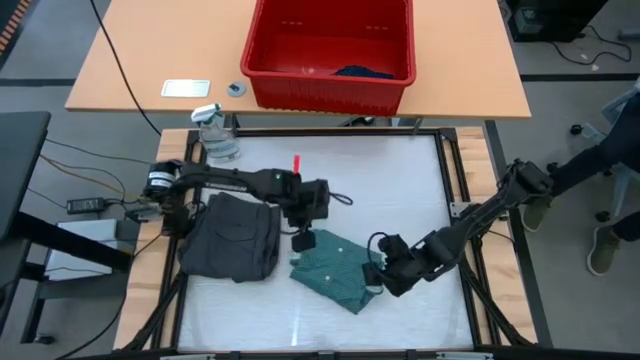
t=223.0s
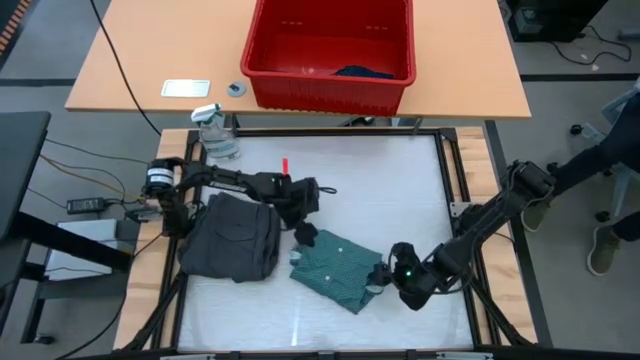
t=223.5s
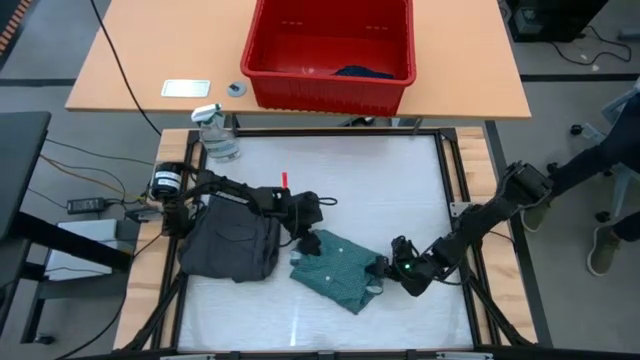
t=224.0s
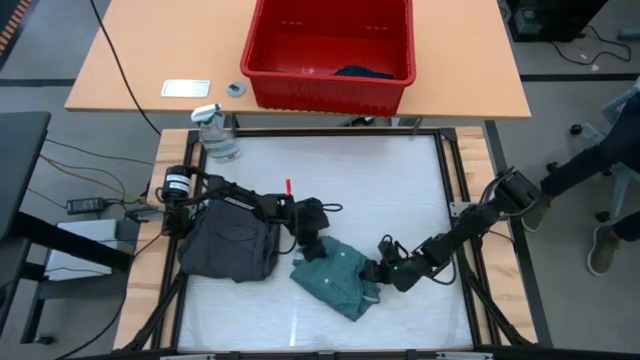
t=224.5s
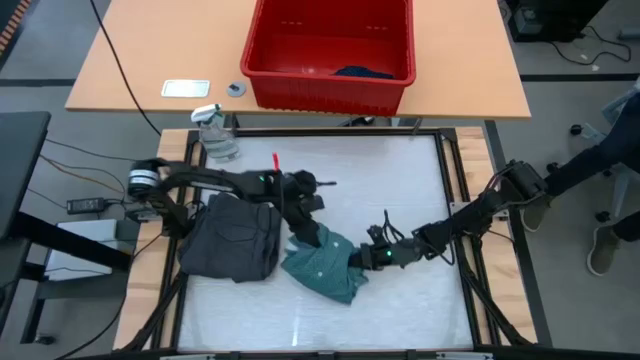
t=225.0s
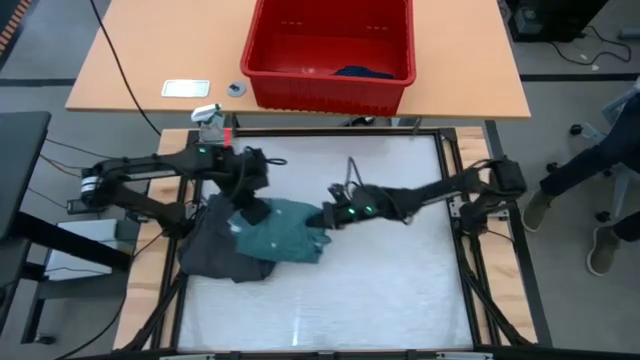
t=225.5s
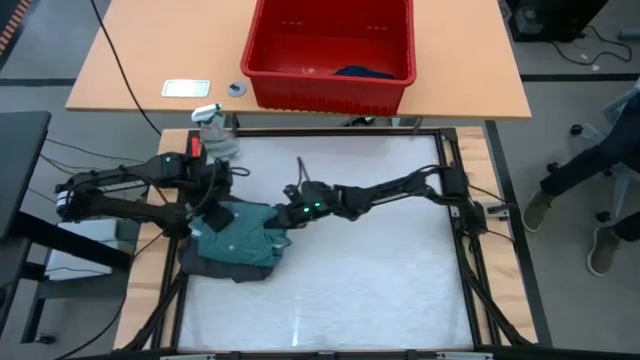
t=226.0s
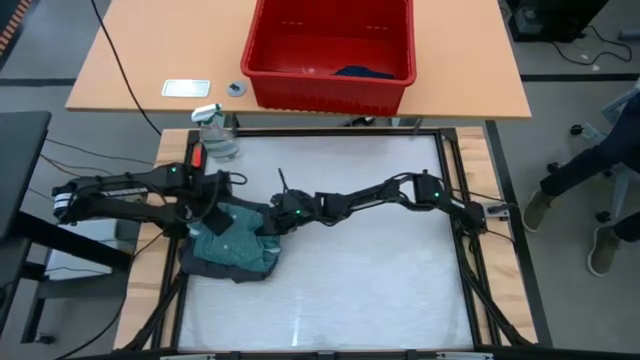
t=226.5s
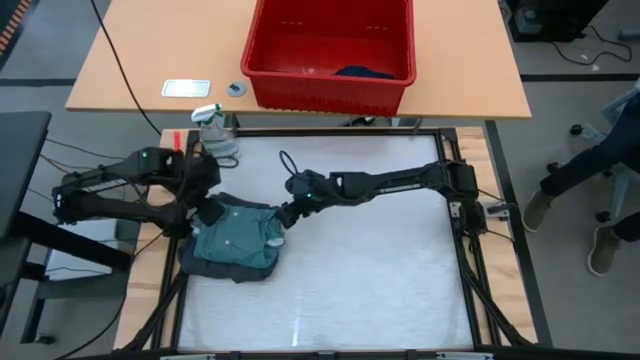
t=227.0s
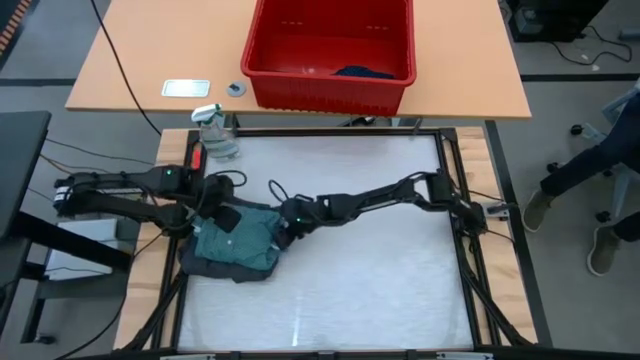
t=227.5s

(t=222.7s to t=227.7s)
Task: Fold Laundry from Bin
Stack the green polo shirt on top of the gray short on the table

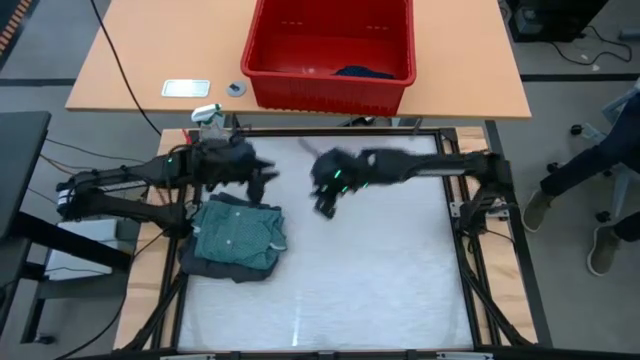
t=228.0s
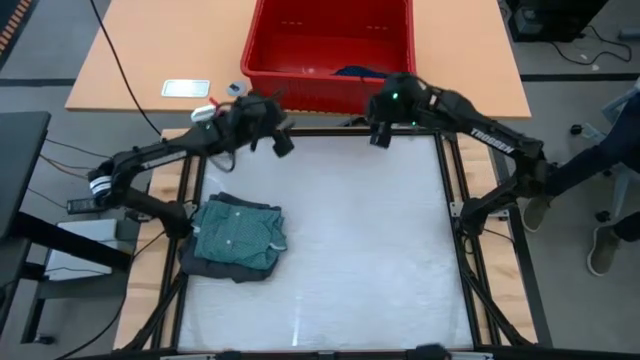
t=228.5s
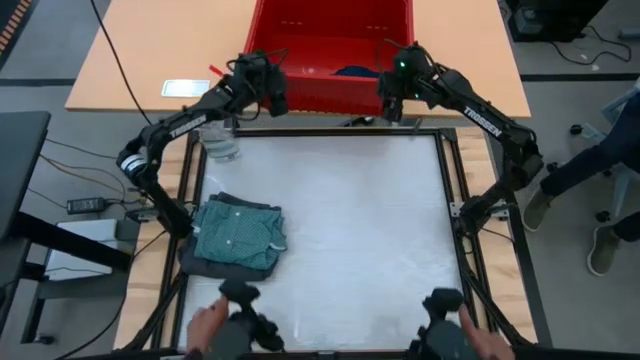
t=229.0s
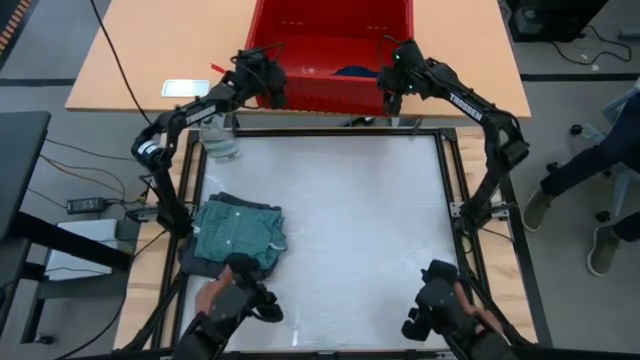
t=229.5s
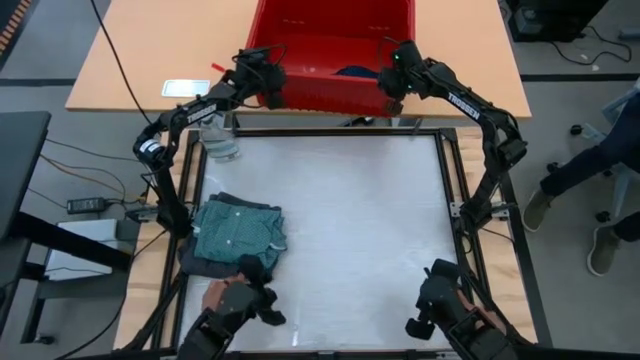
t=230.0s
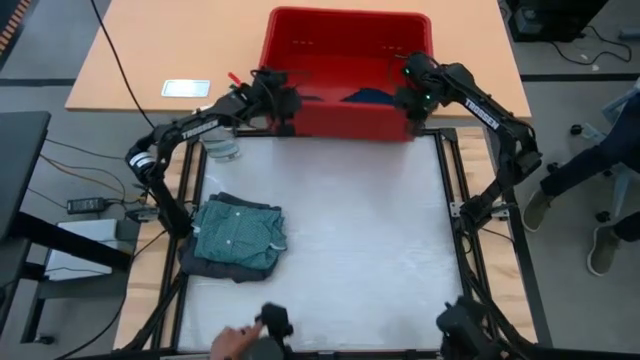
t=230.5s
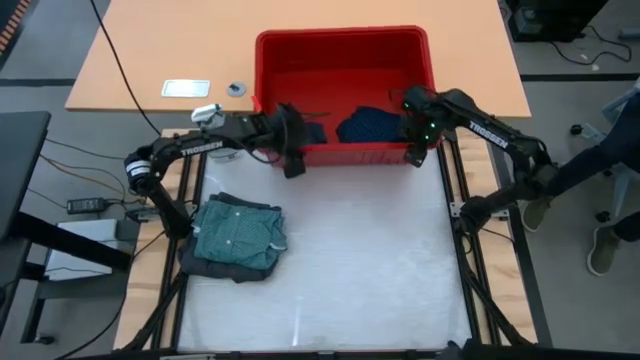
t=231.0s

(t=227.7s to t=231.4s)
Adjust the red organizer bin on the table

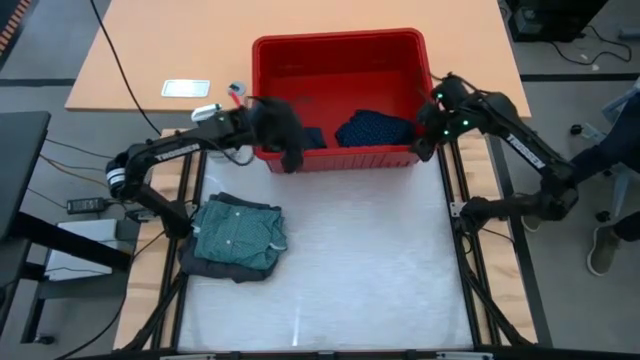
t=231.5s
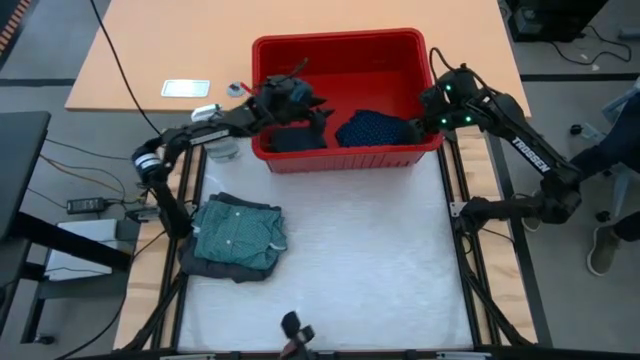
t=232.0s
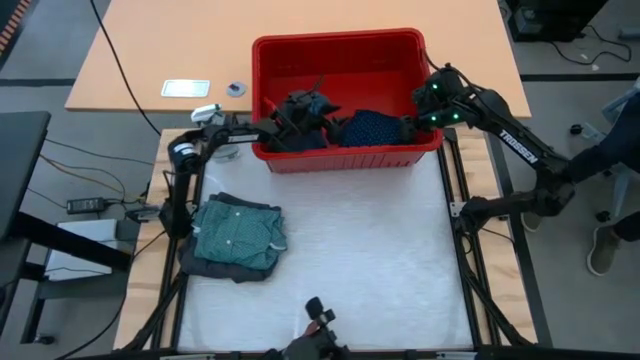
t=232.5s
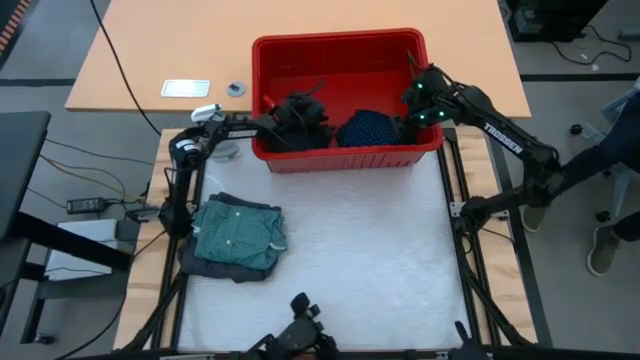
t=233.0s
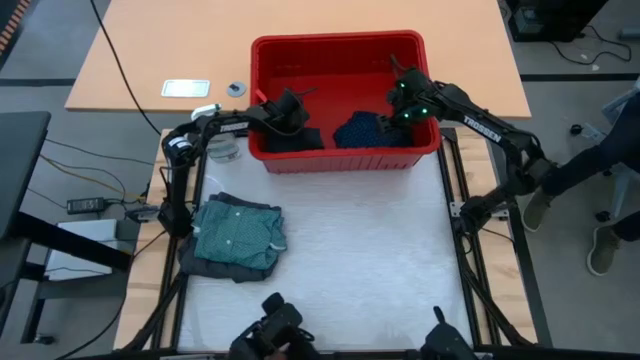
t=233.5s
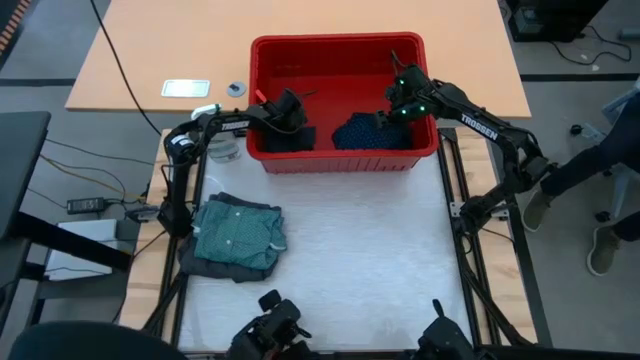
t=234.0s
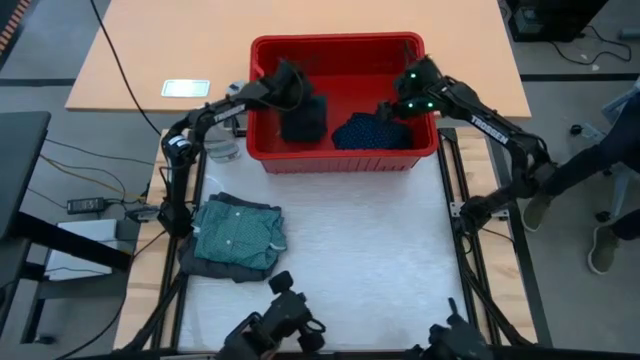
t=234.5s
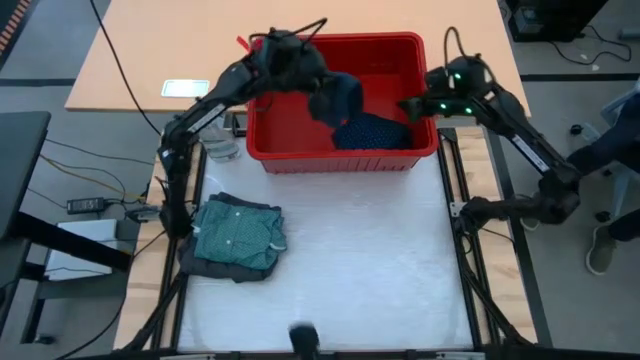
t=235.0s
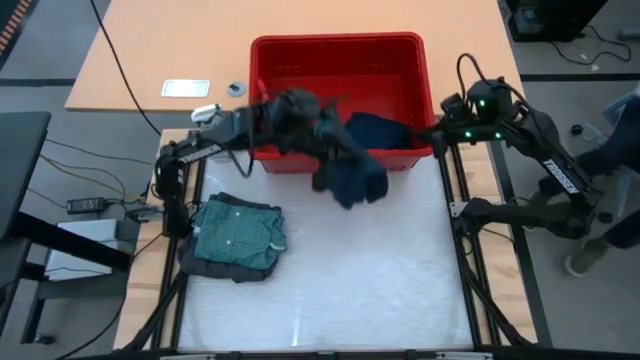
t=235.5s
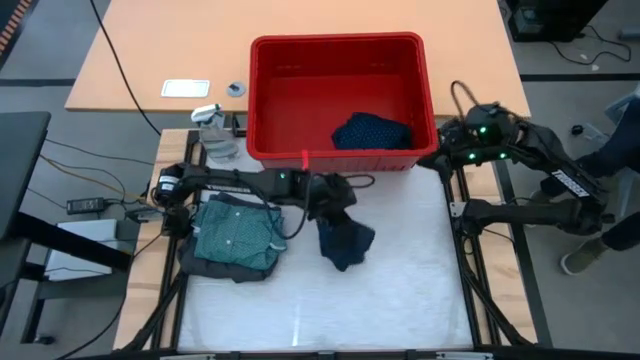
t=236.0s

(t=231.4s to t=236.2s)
Put the dark blue short on the table

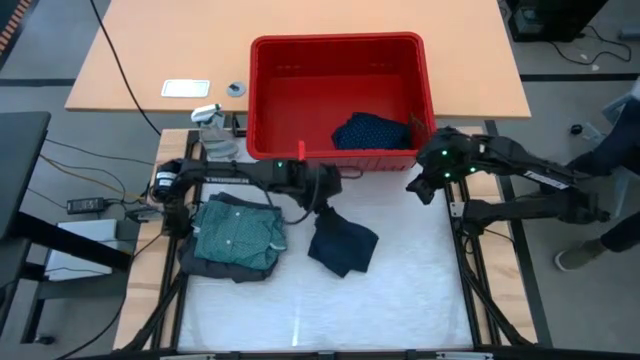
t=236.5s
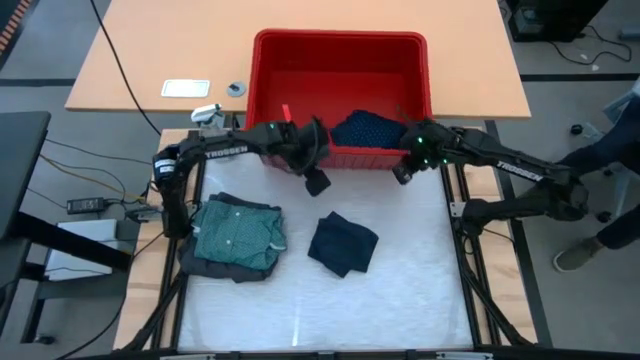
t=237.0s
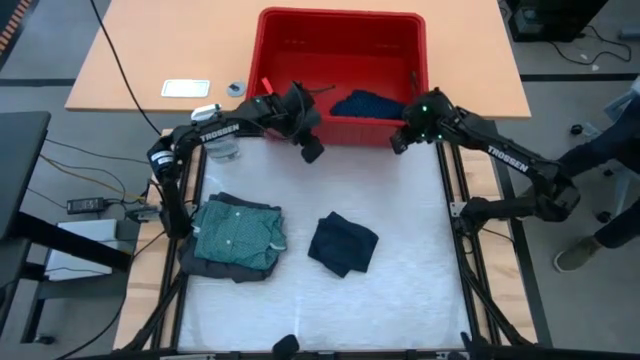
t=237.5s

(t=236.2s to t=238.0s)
Adjust the red organizer bin on the table

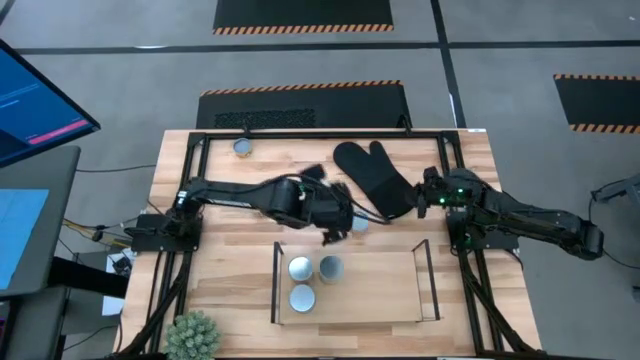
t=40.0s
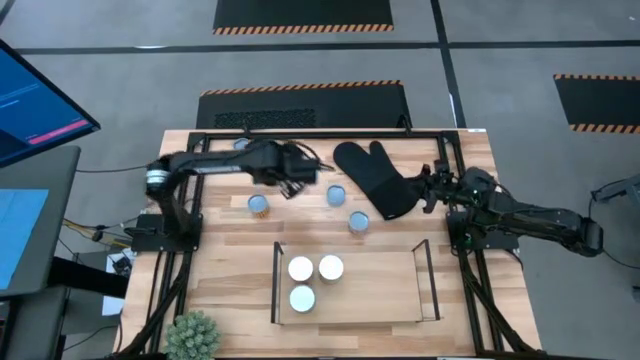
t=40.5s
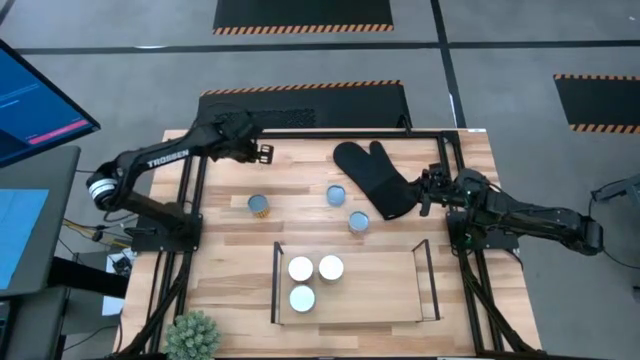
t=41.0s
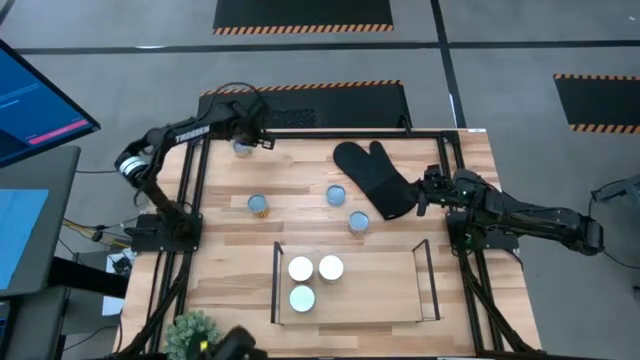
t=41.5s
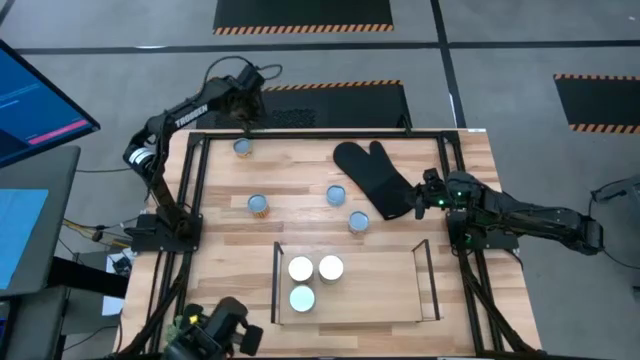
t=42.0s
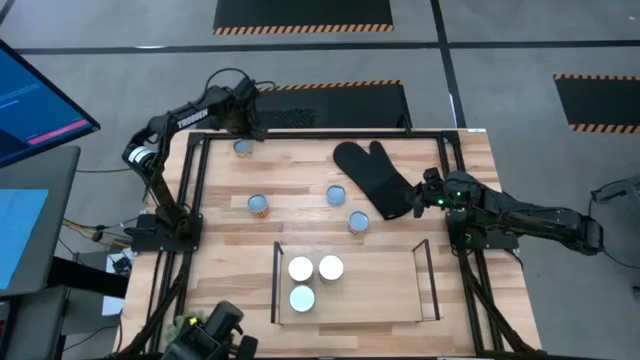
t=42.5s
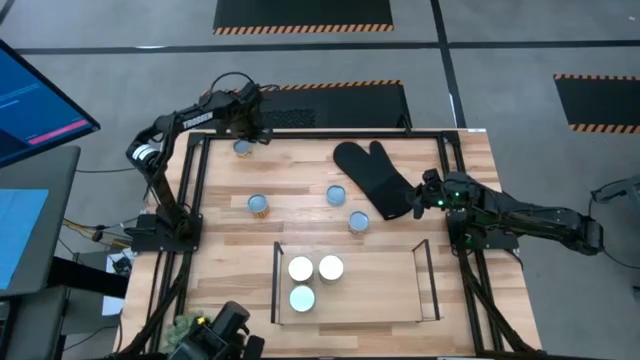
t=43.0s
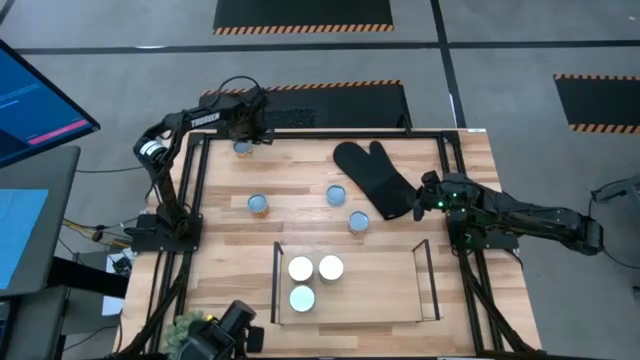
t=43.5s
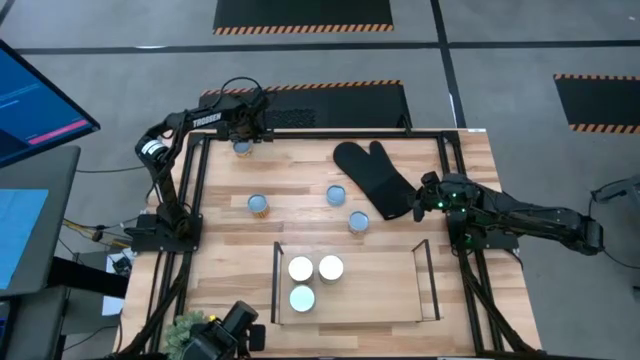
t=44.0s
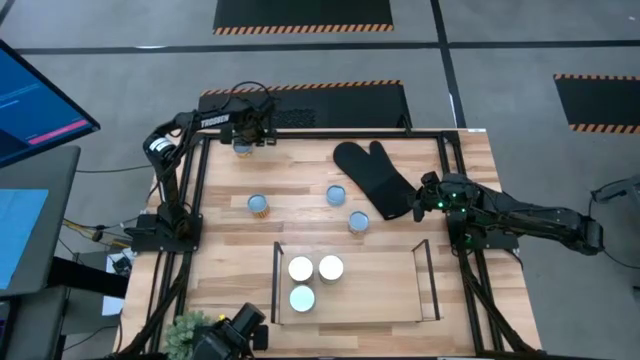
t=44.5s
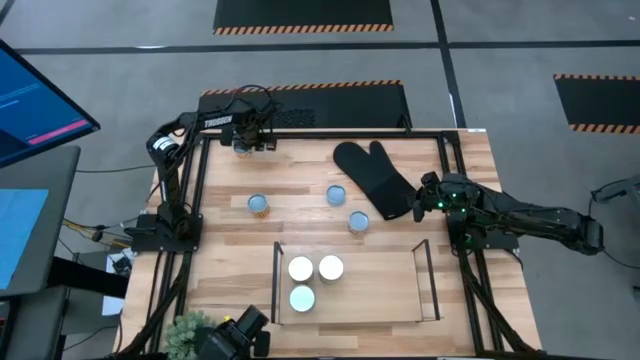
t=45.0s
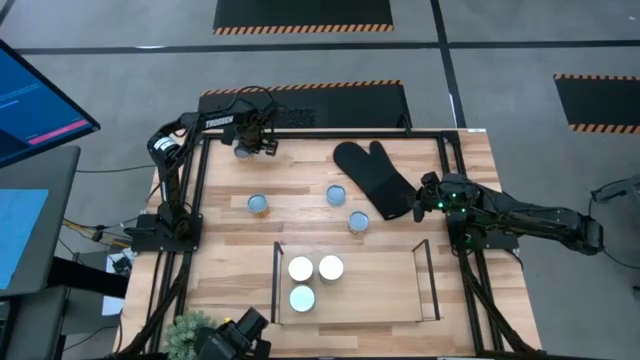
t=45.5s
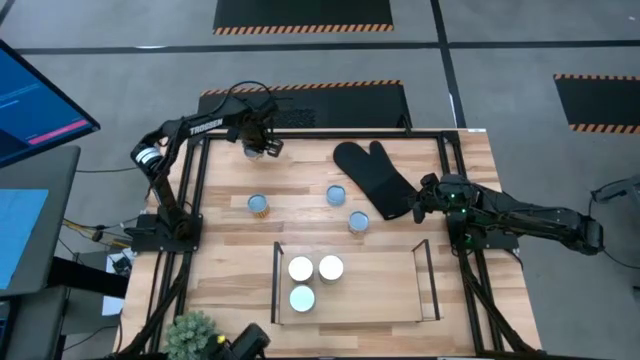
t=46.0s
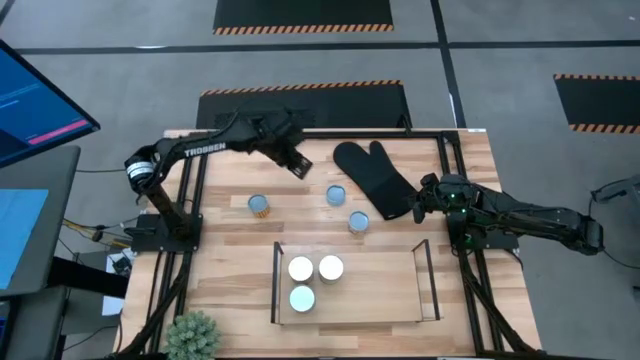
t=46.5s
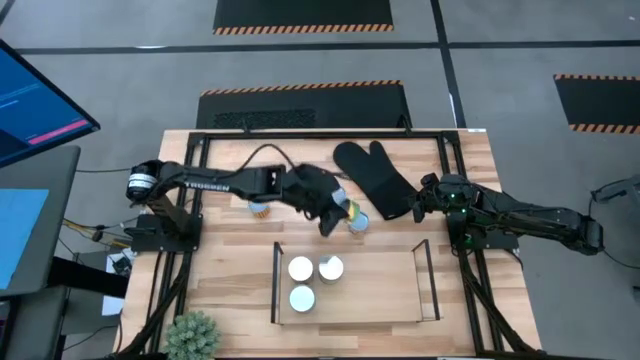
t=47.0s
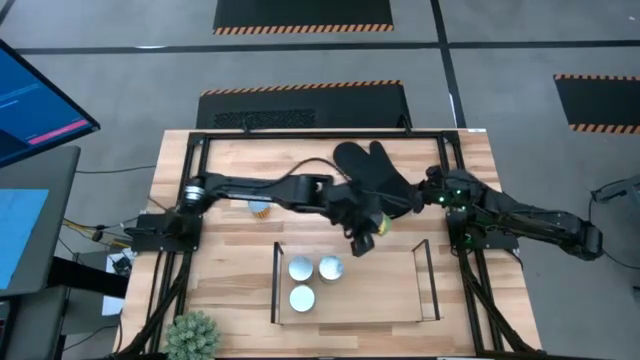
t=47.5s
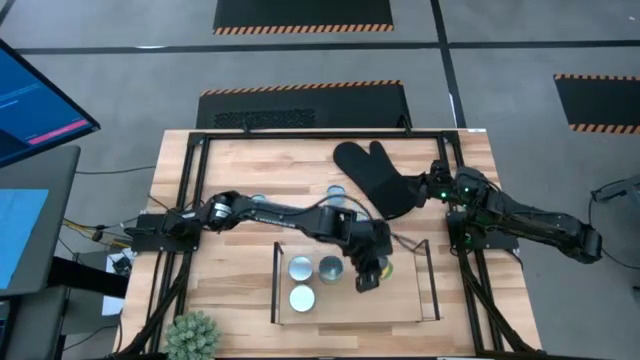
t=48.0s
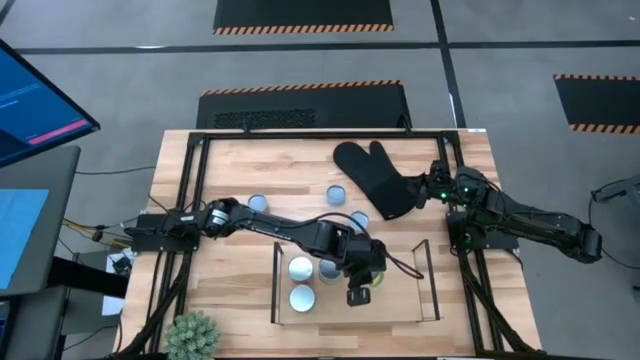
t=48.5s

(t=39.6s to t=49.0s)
Task: Pick and place cans onto a shelf
Put the canned mushroom on the shelf
